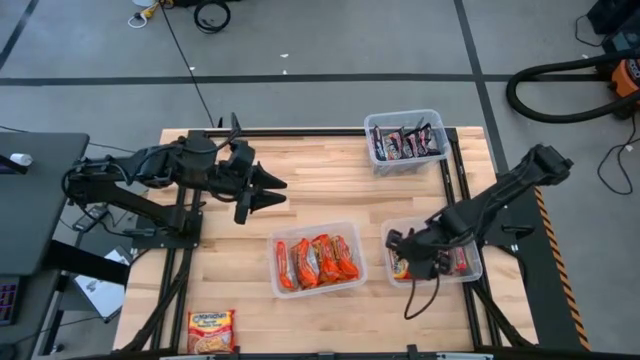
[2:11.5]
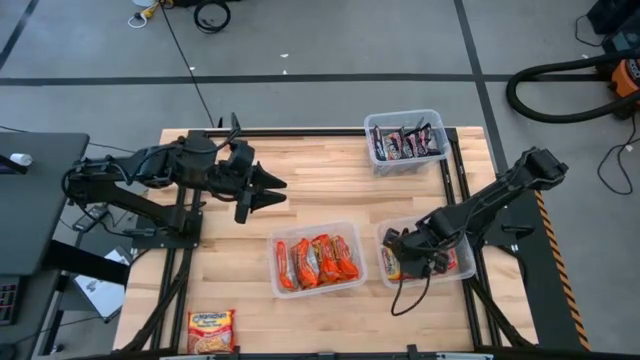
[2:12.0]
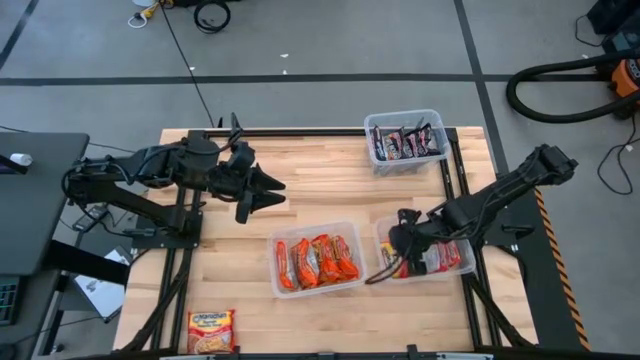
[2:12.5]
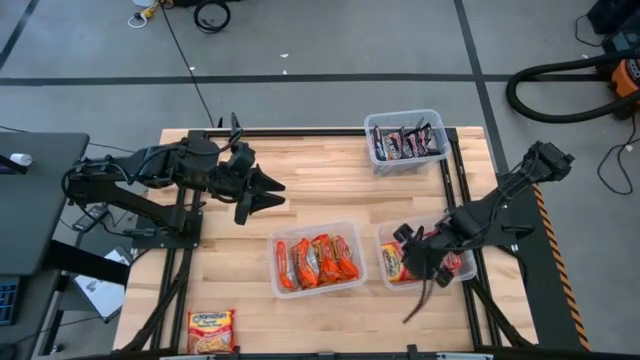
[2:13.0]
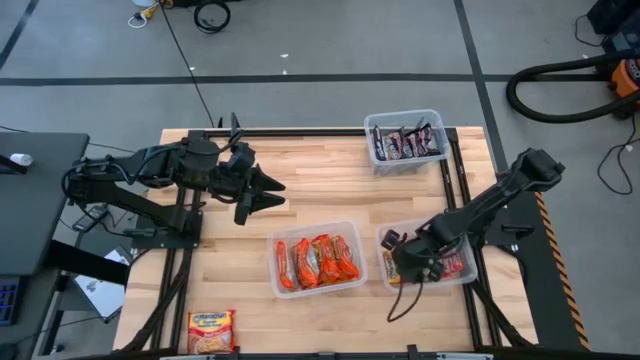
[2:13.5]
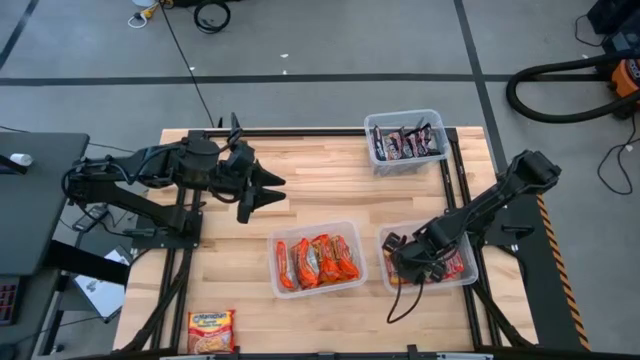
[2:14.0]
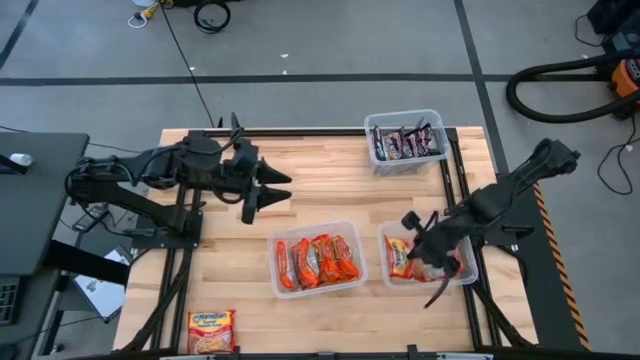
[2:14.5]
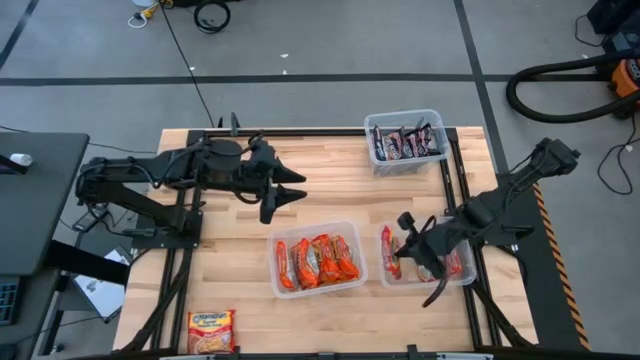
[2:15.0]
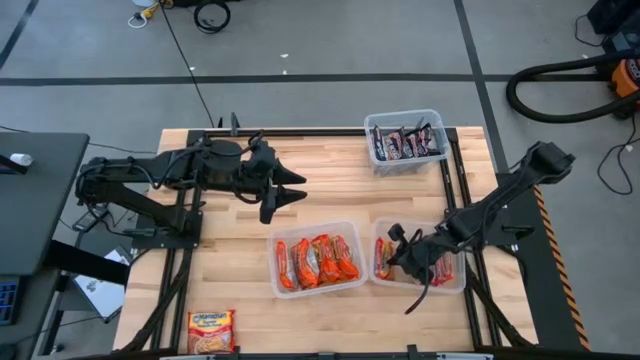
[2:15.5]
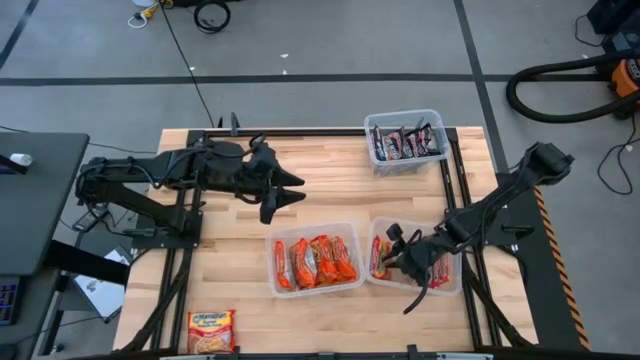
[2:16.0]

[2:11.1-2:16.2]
Task: Sort Maruchan noodles
Adjust the red noodle packs in the bottom right transparent bin

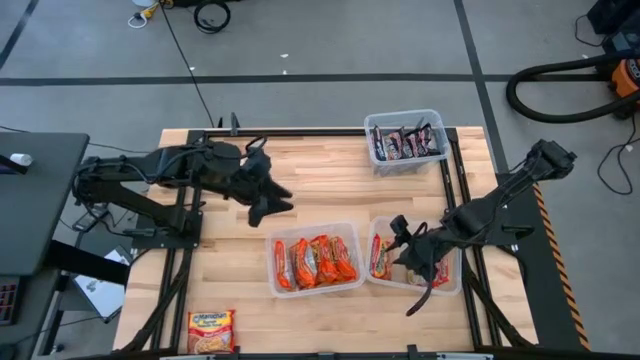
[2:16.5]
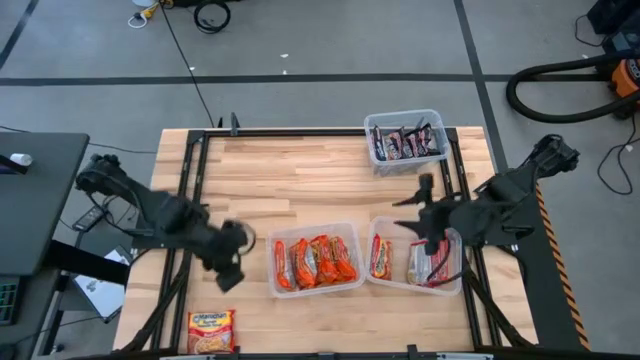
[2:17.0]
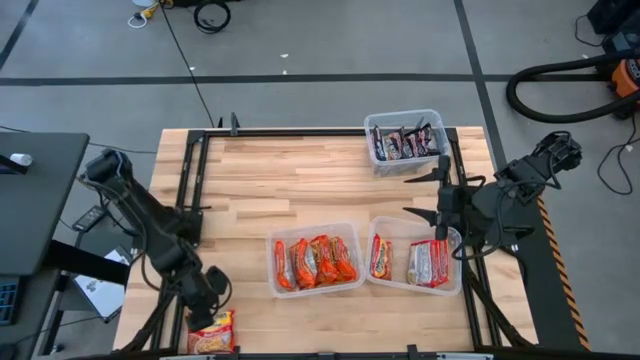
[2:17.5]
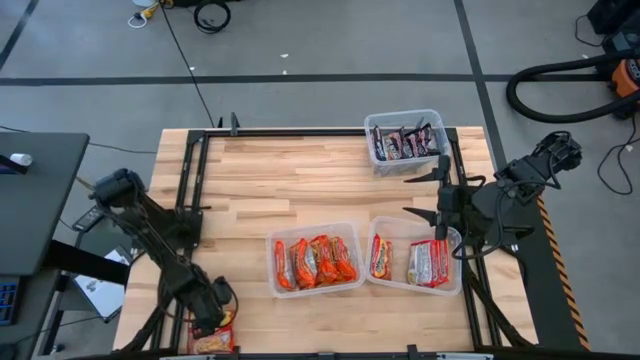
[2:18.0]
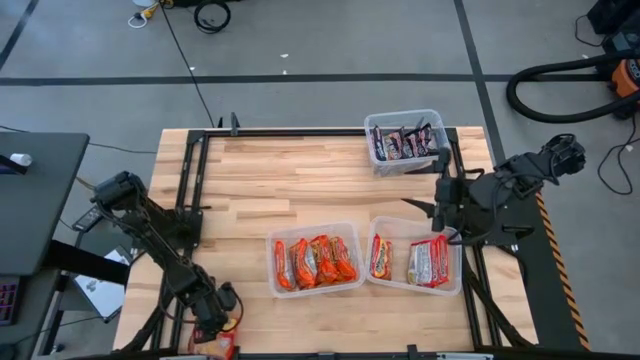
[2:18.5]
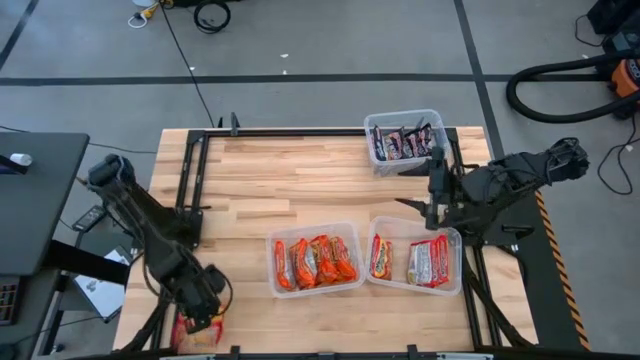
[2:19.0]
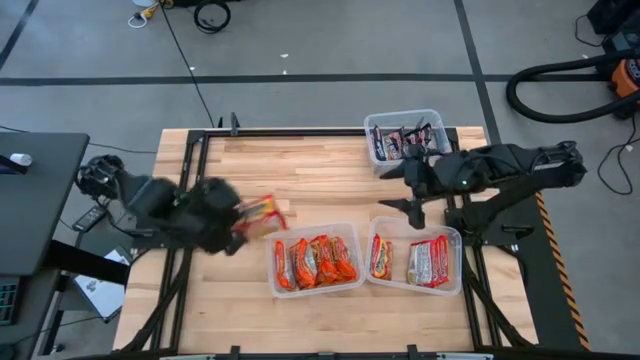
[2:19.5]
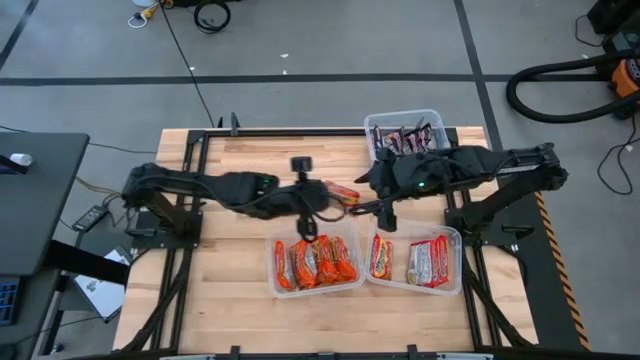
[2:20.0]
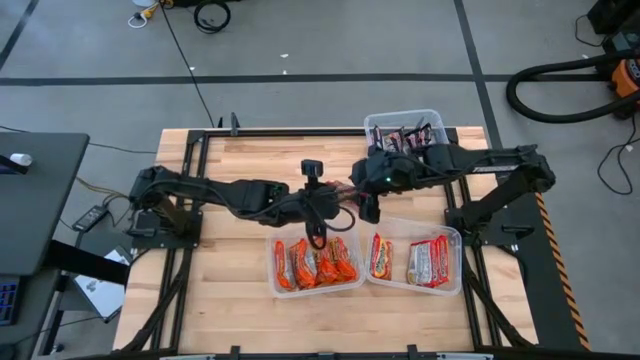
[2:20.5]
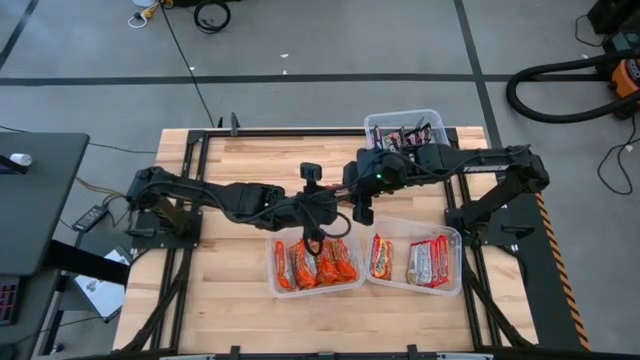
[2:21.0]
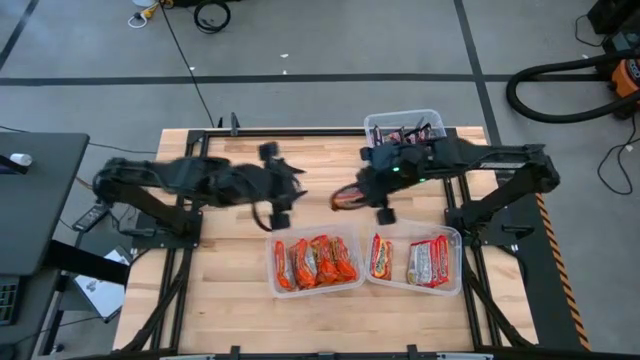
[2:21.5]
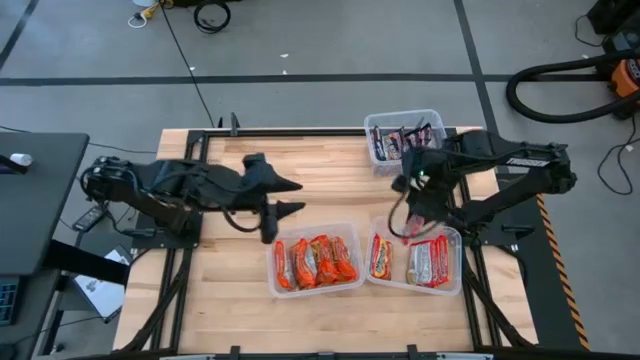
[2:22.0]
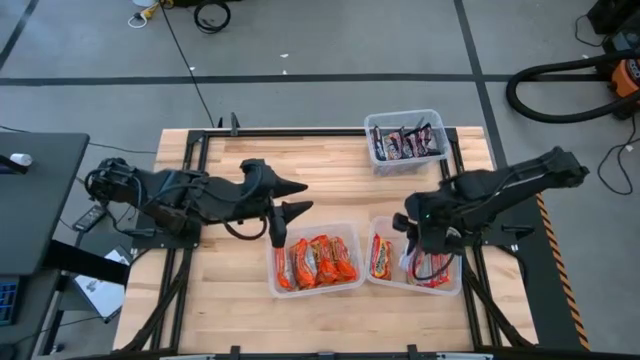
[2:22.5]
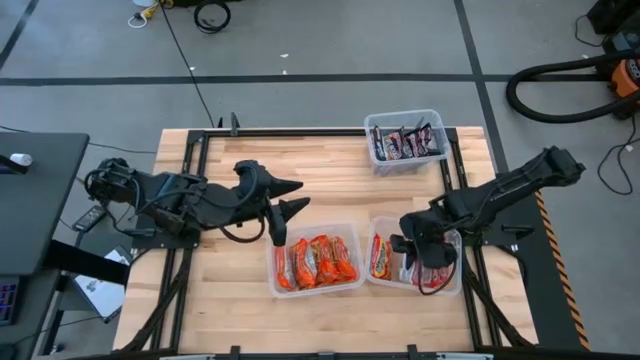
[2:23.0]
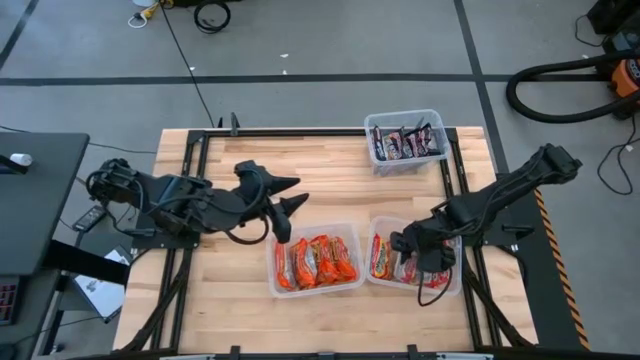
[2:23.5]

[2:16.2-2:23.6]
Put the red noodle pack into the bottom right transparent bin

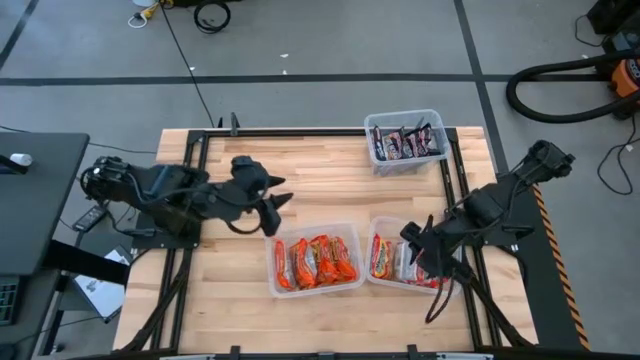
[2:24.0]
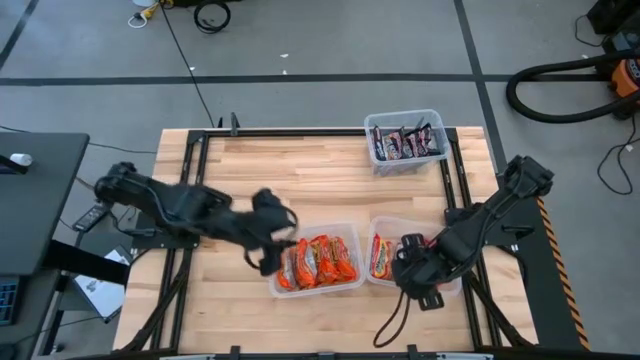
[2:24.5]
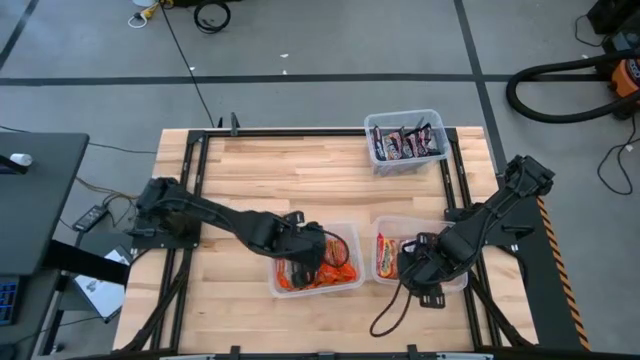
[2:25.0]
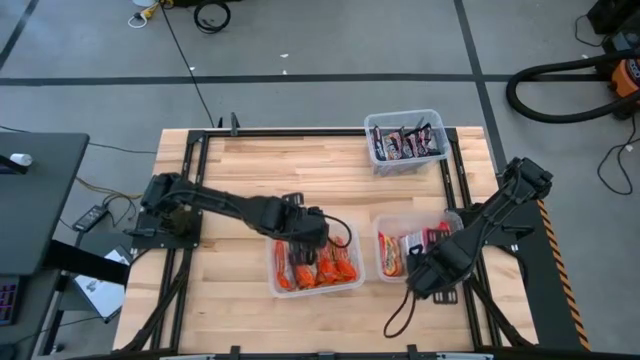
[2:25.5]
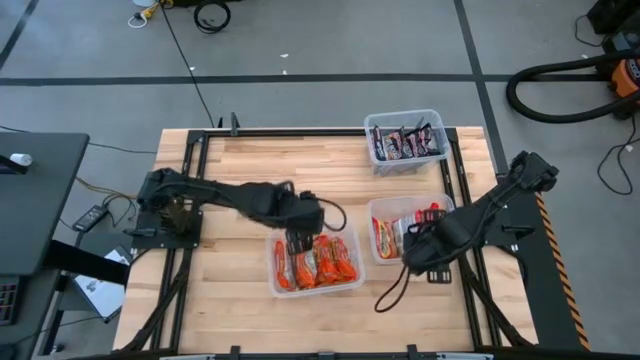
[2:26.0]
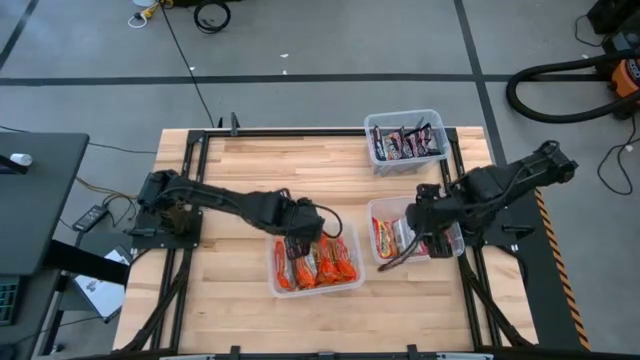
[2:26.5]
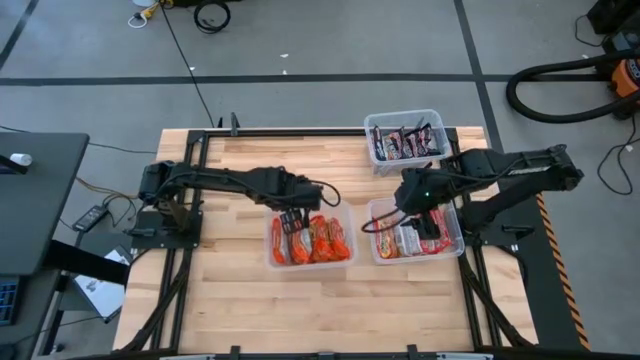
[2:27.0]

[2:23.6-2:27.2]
Adjust the transparent bins

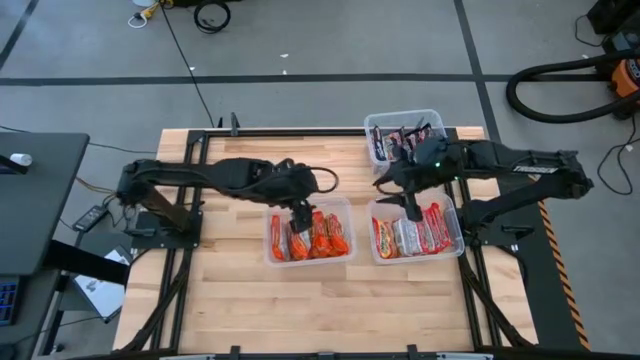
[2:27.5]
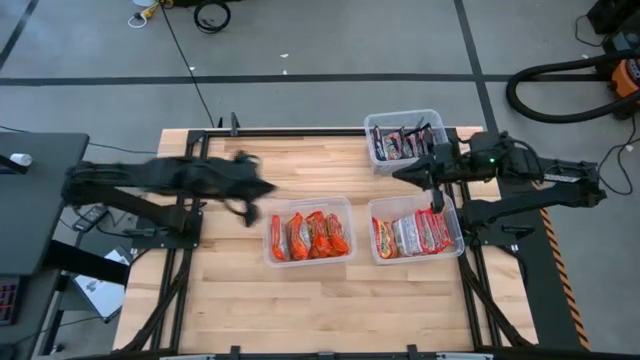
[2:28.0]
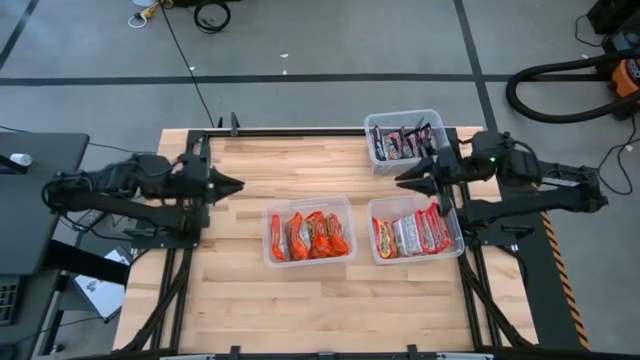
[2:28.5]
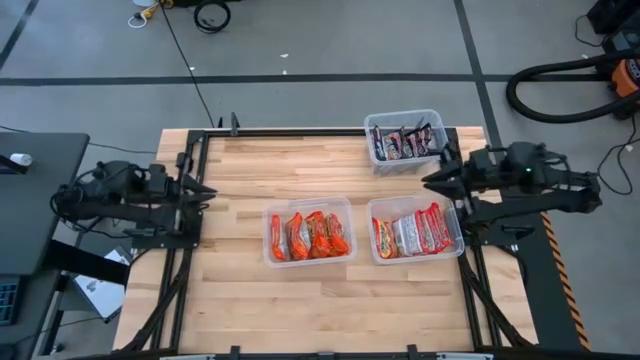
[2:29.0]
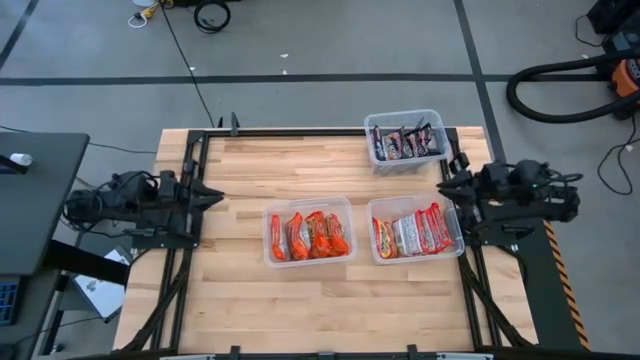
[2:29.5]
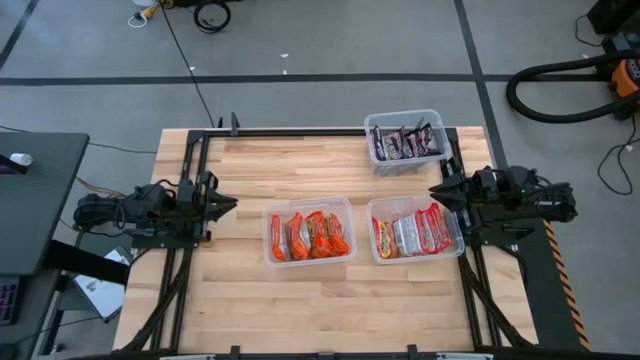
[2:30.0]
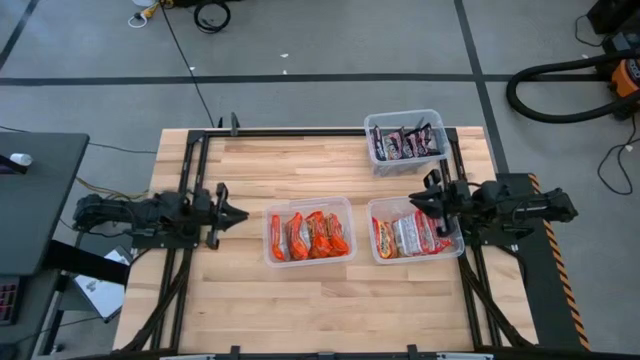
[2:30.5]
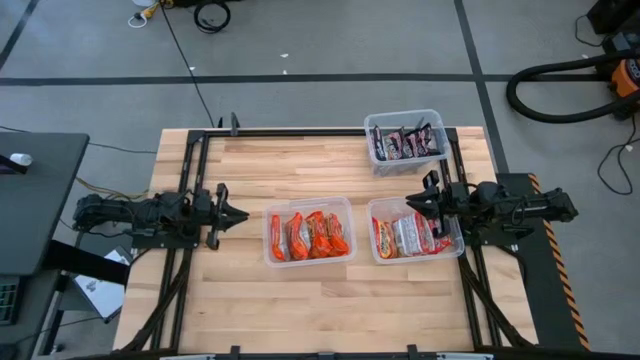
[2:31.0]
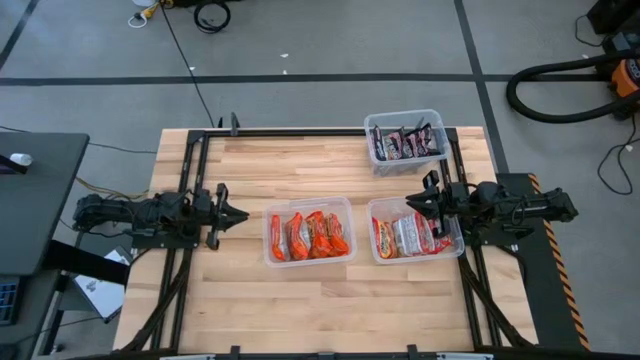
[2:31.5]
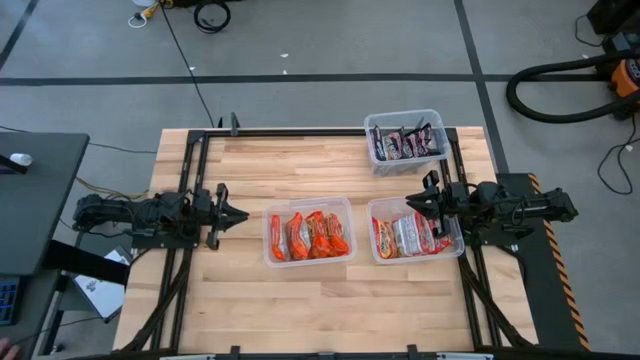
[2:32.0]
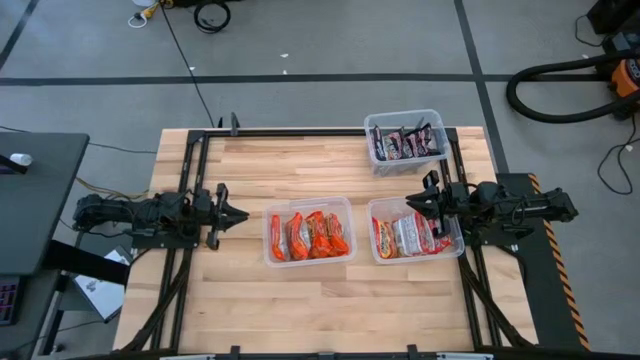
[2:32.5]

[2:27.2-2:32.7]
Return to Home Position
